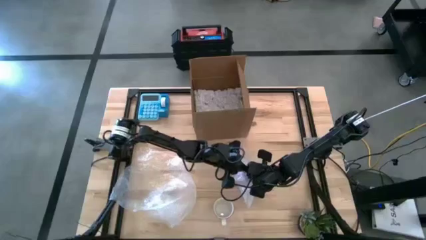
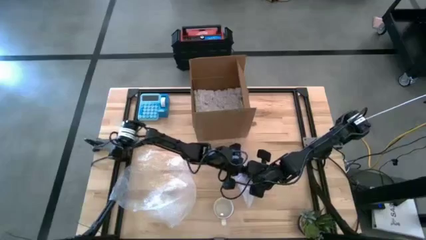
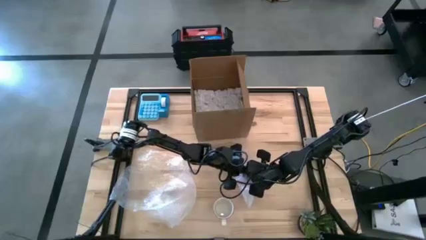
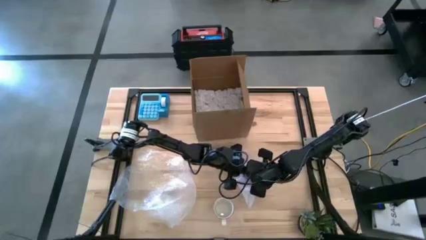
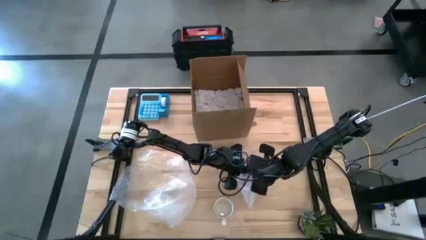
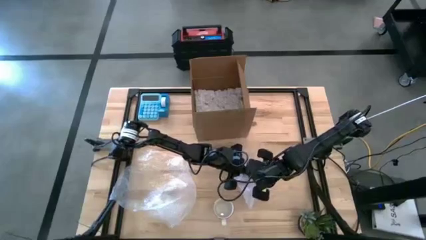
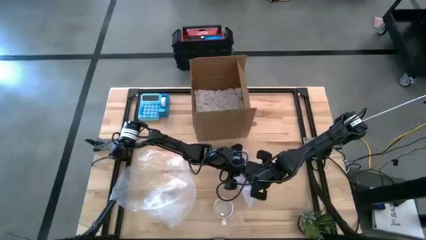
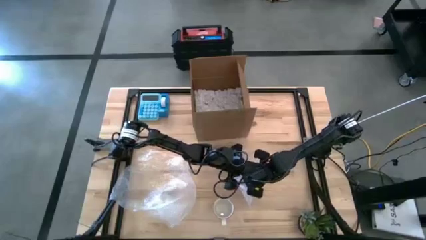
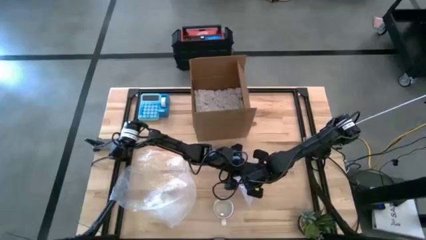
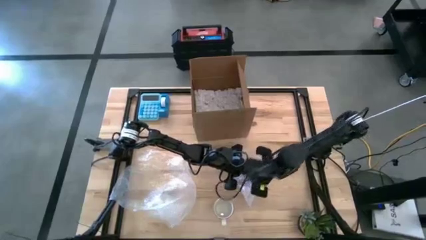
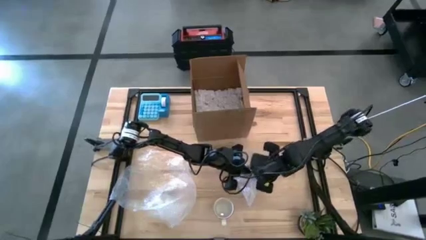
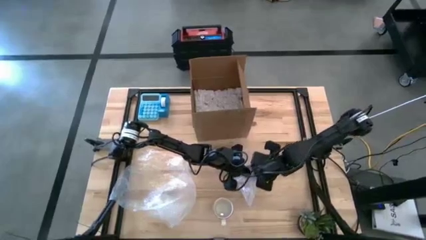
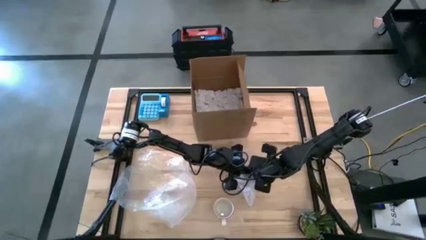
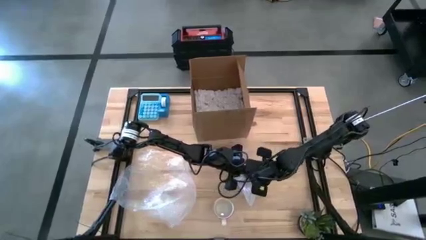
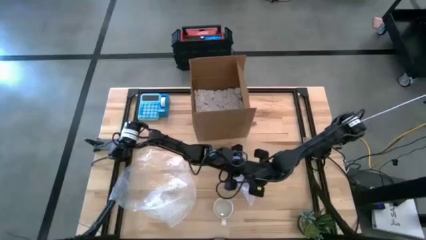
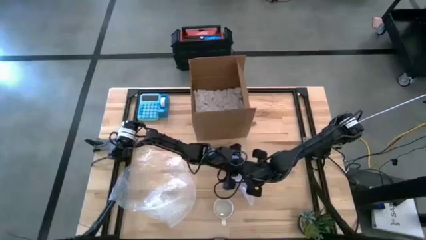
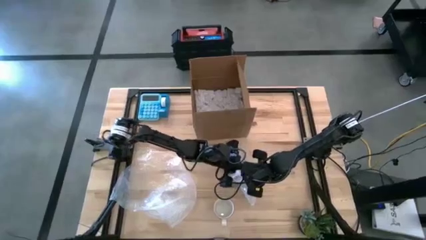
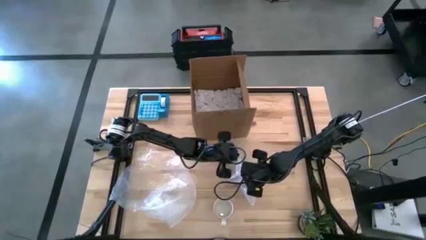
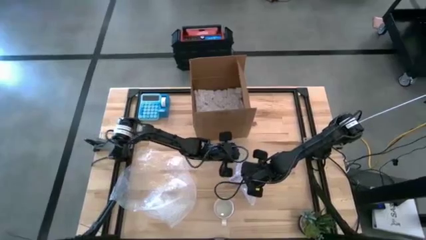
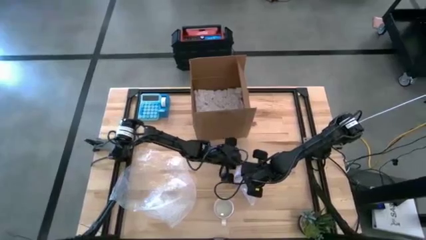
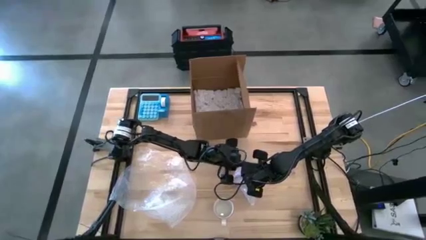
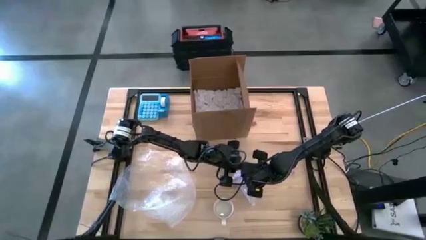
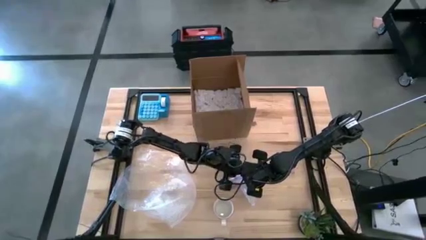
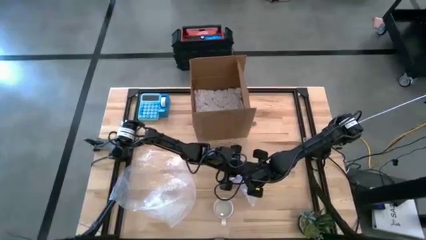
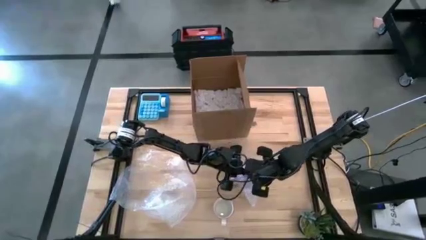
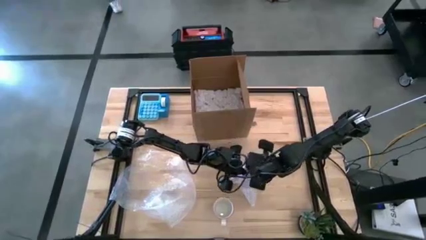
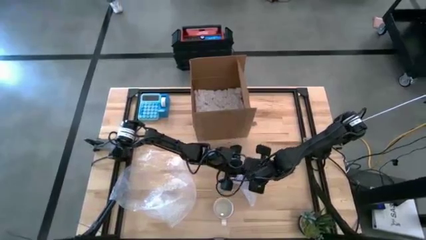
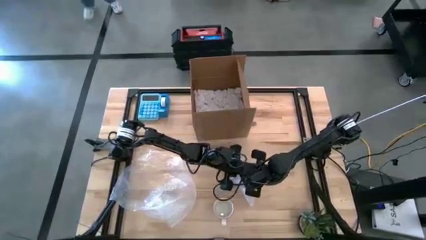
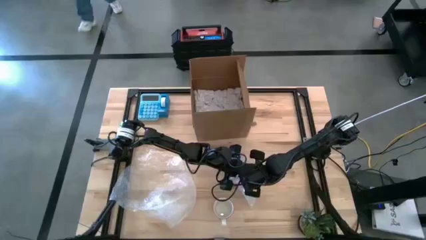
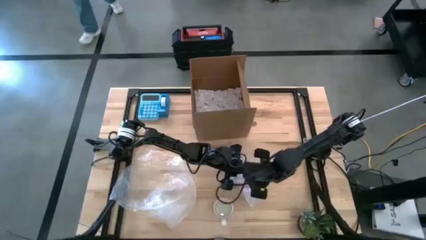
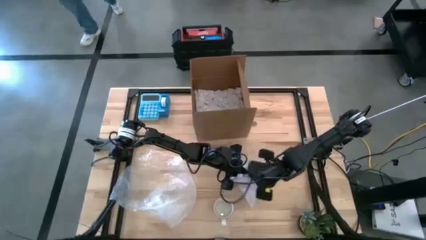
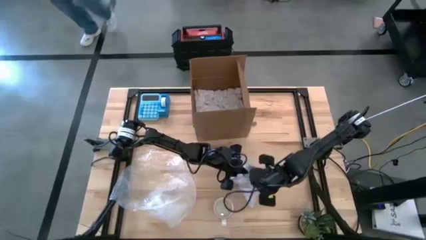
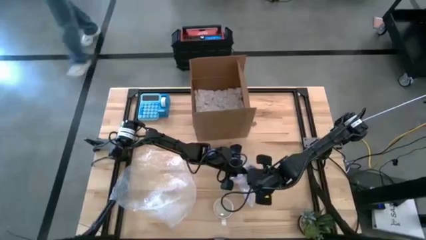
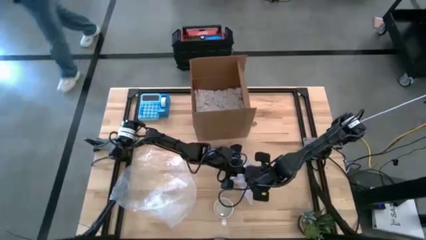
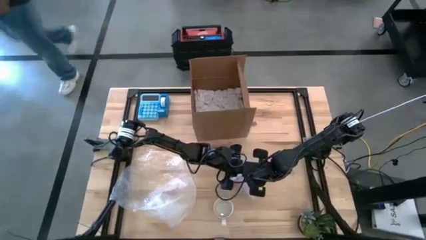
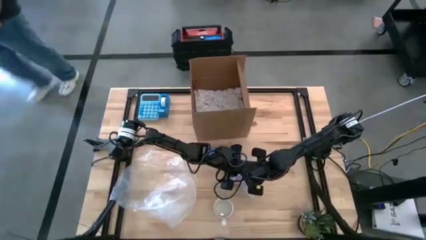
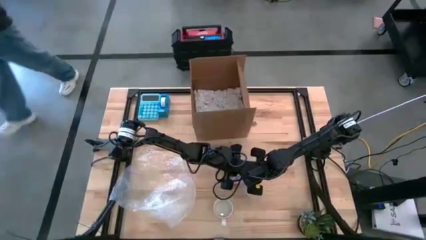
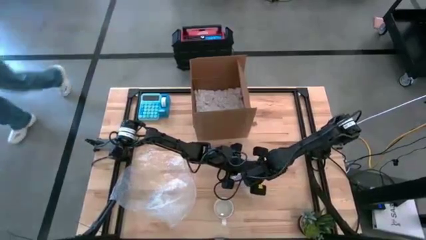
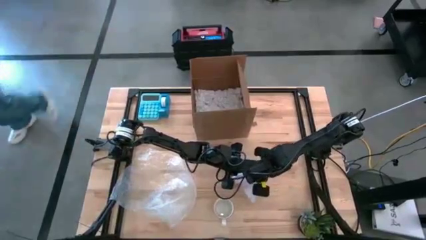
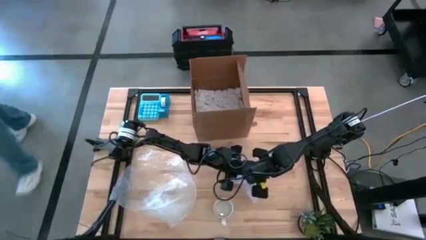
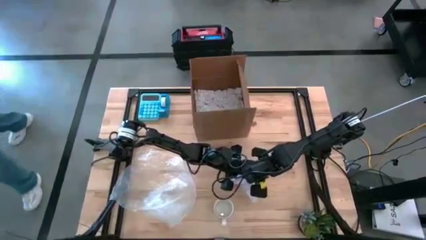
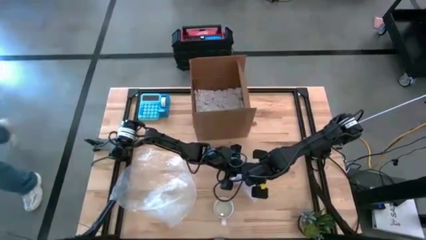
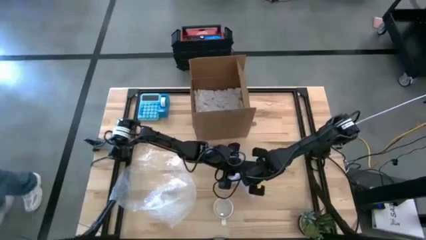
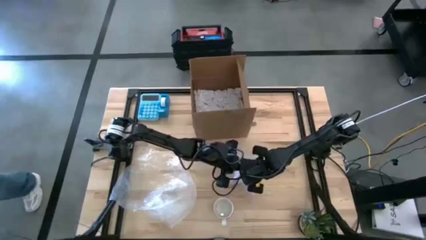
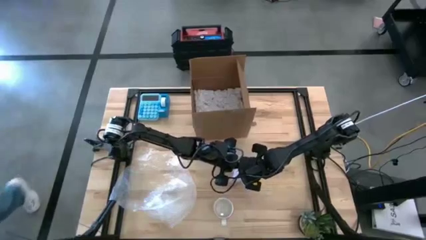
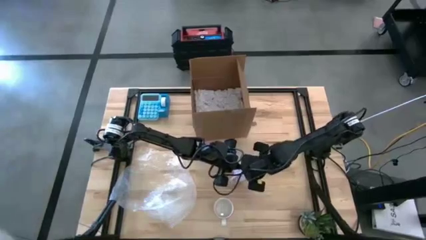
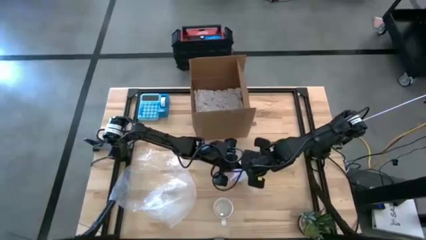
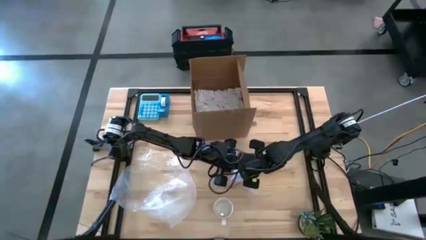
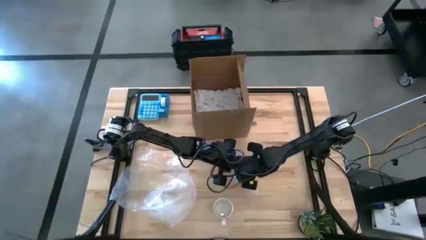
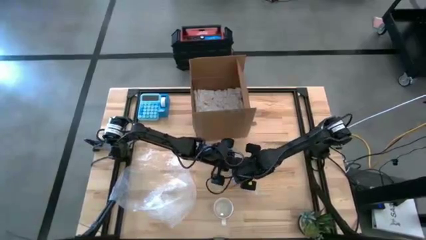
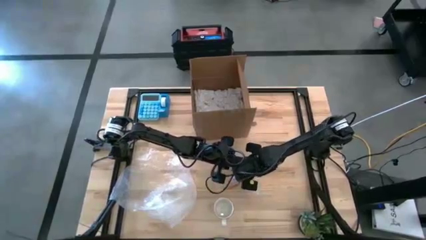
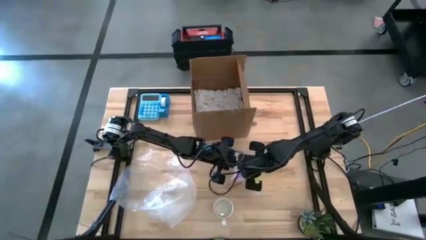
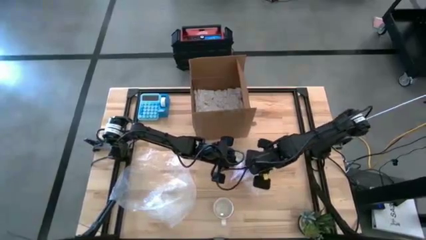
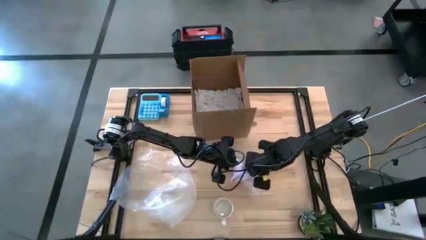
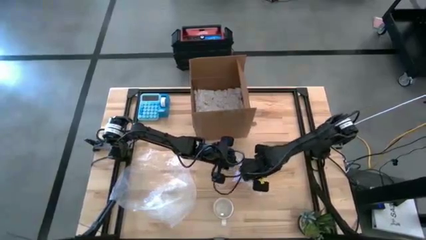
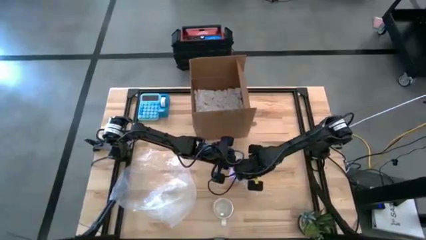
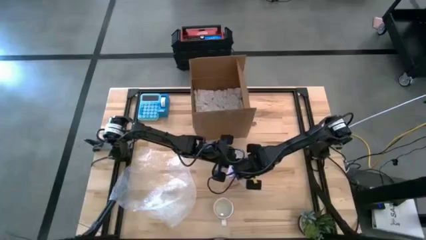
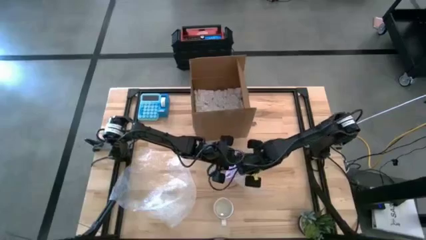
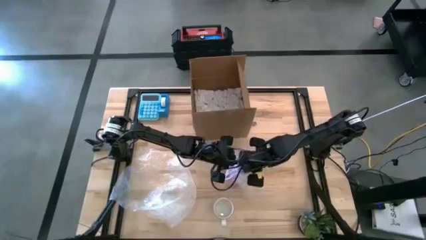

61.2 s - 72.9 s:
Task: wrap mug
Wrap the purple mug using the right bubble wrap

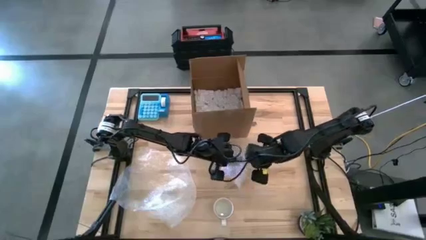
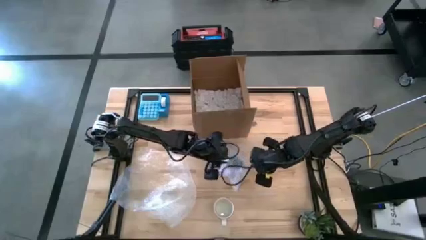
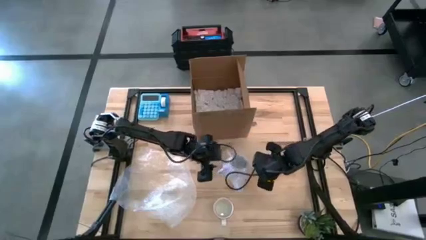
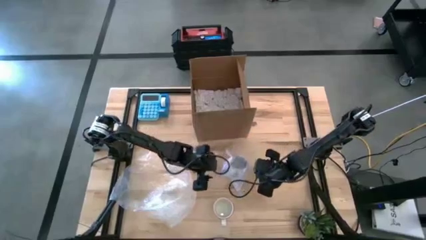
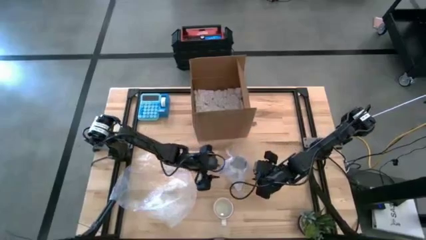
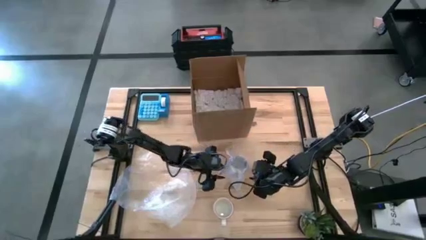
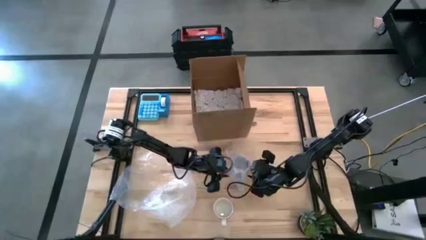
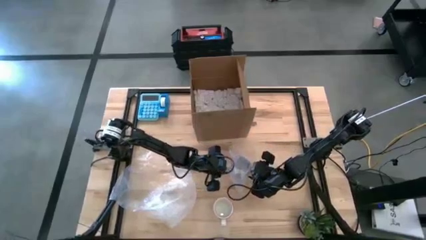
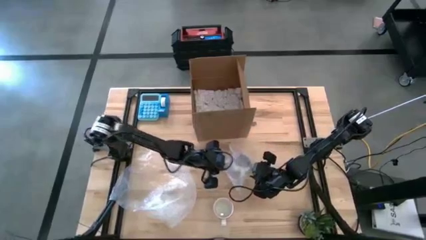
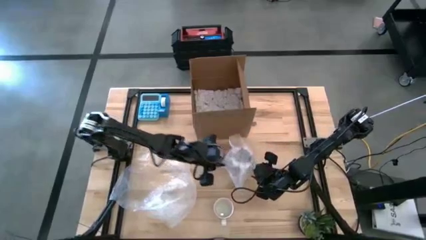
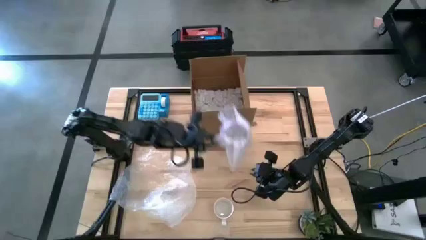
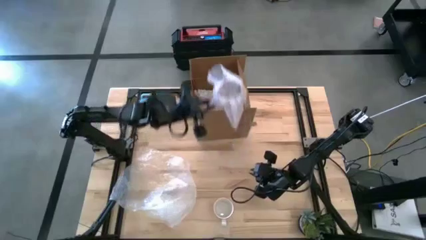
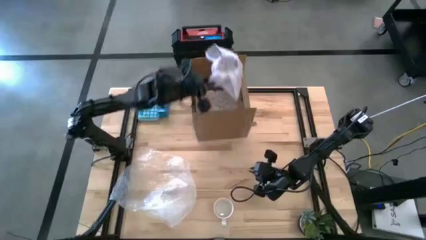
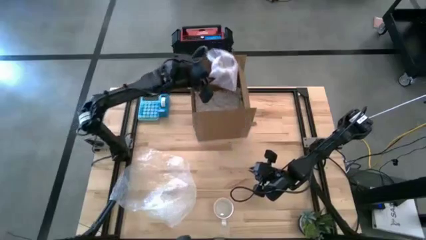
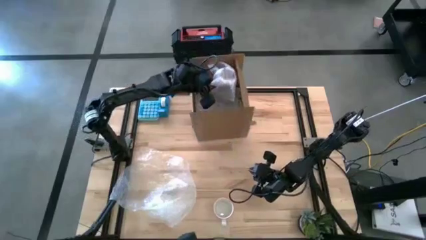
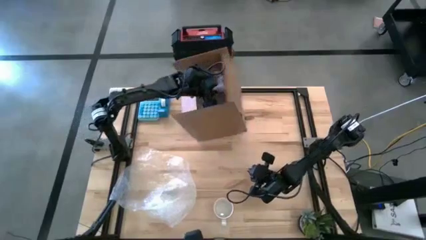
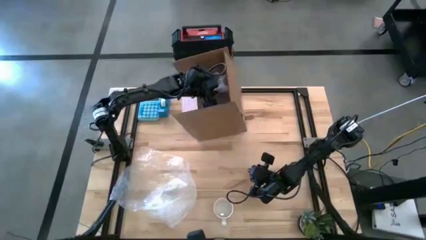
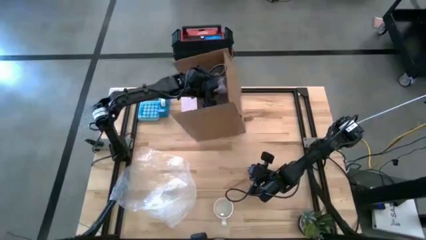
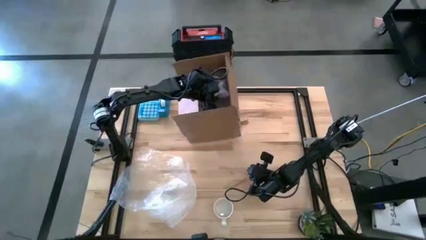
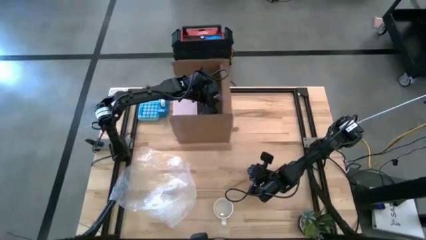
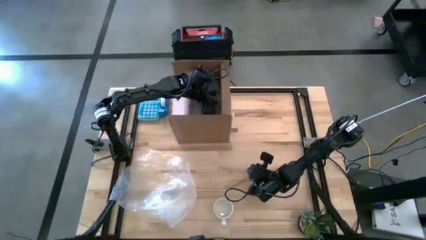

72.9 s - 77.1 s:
Put the wrapped purple mug into the box

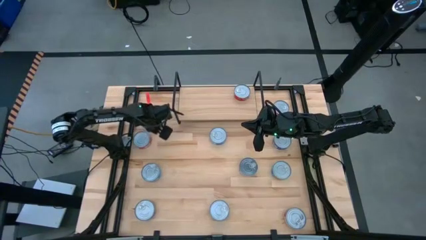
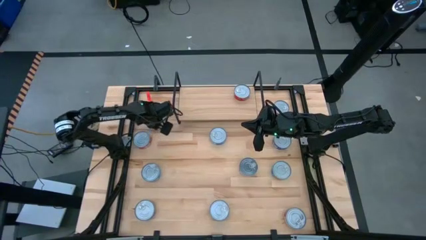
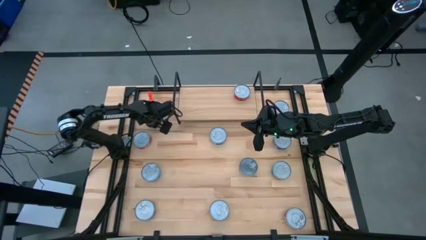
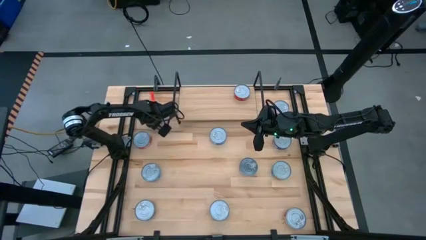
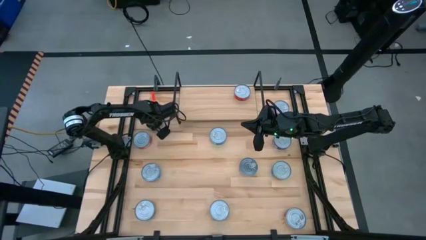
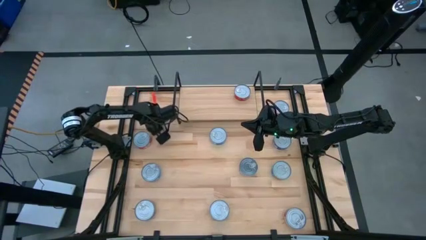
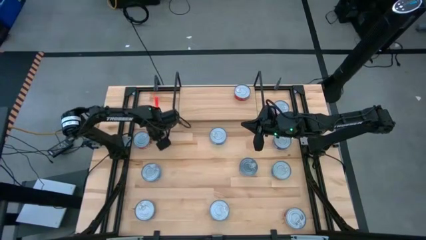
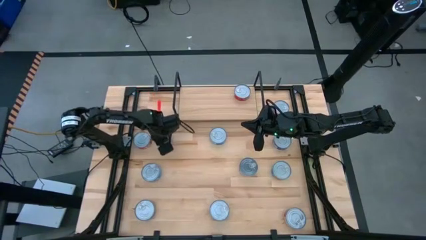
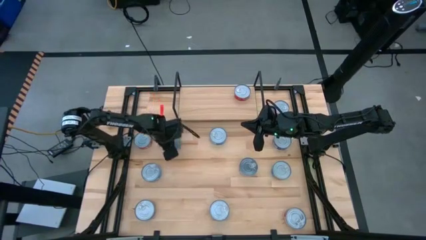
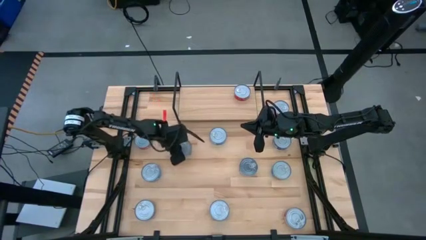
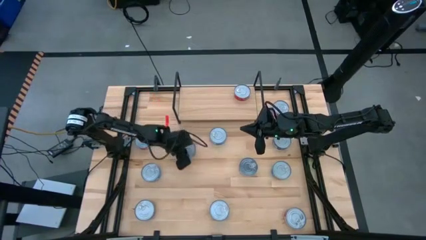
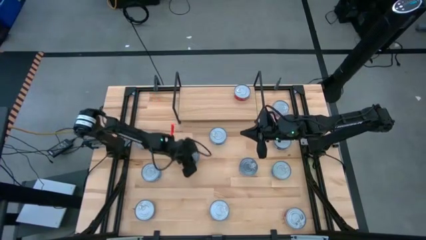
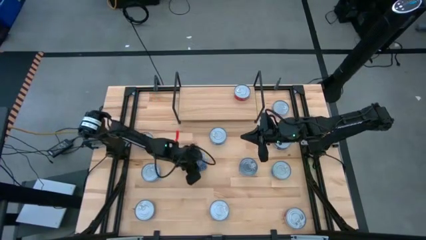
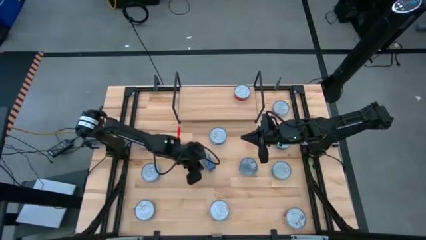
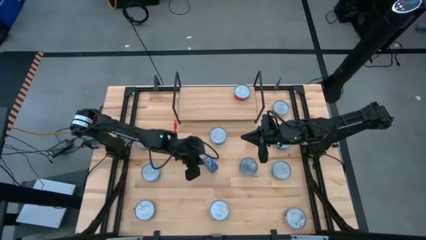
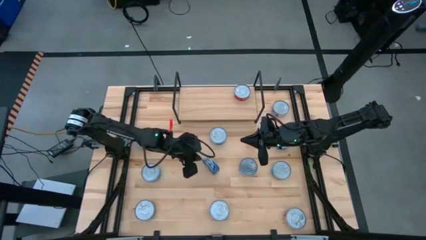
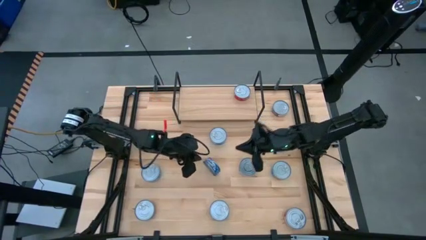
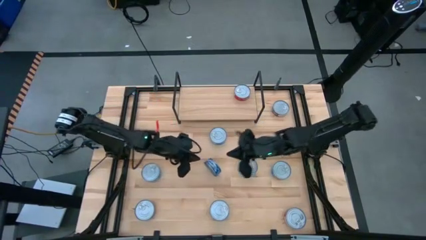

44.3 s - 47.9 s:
Task: Stack canned seafood by type on shelf
Move the top left blue tuna can to the center of the table
